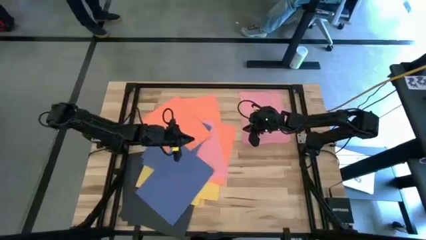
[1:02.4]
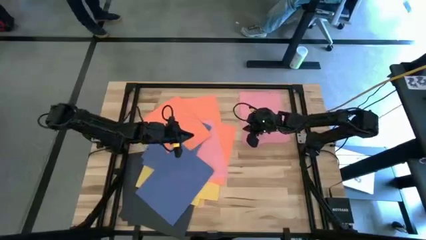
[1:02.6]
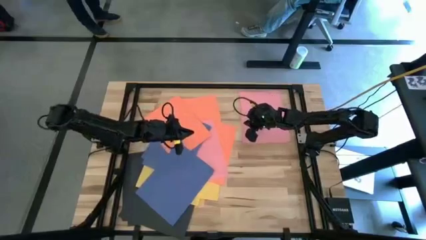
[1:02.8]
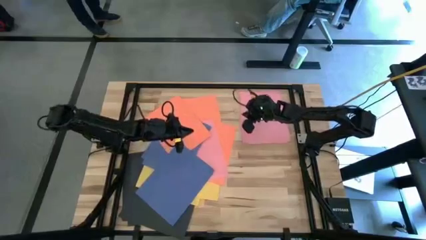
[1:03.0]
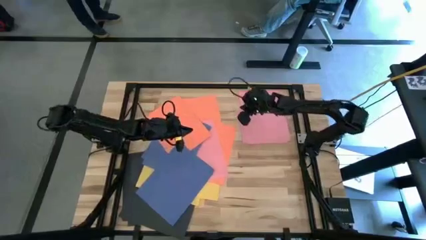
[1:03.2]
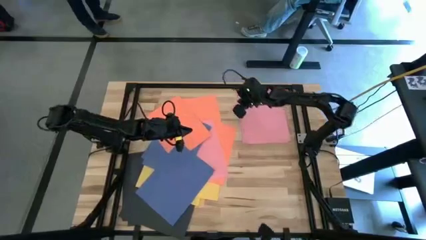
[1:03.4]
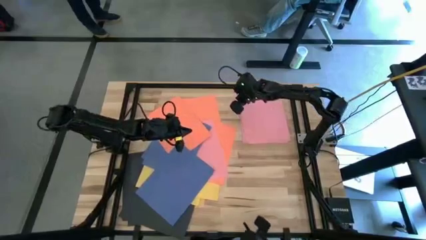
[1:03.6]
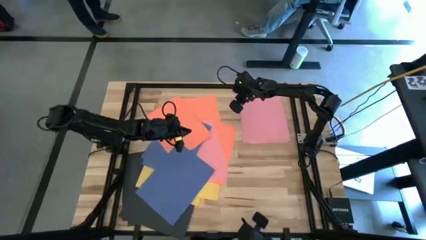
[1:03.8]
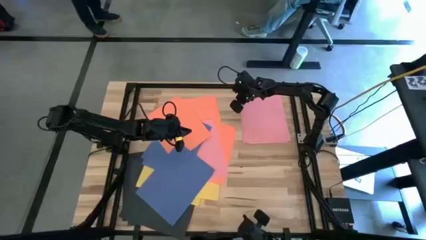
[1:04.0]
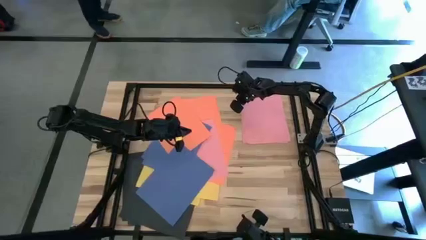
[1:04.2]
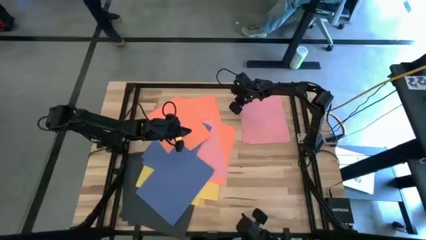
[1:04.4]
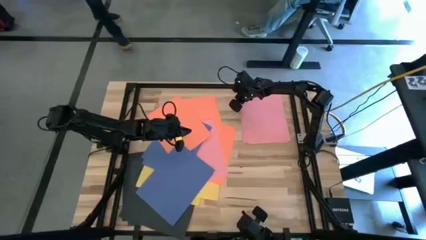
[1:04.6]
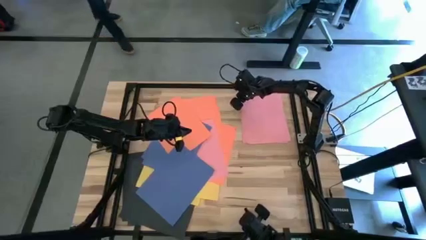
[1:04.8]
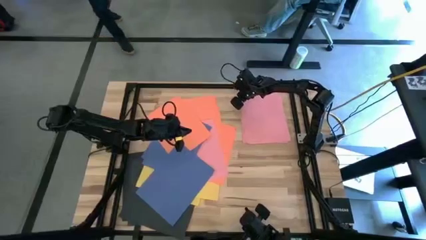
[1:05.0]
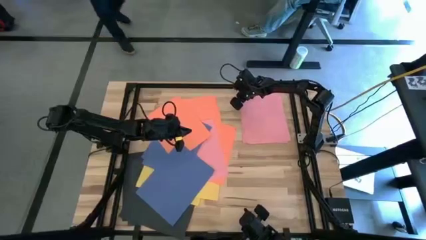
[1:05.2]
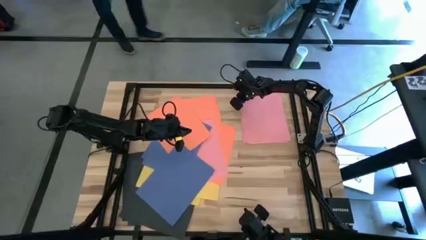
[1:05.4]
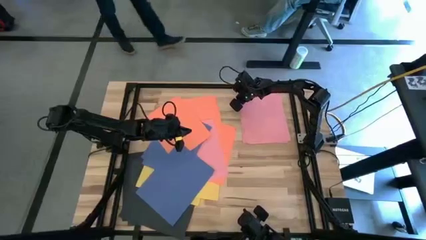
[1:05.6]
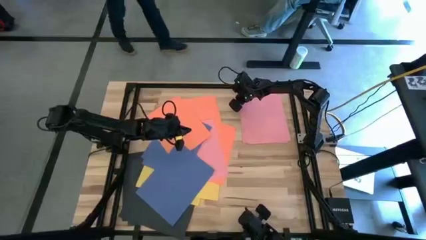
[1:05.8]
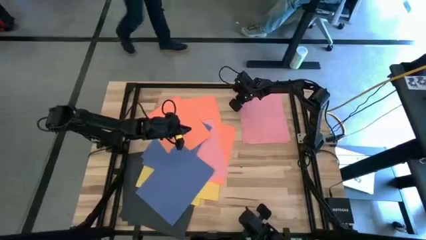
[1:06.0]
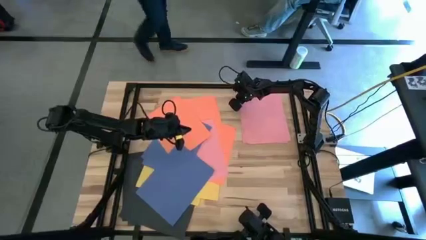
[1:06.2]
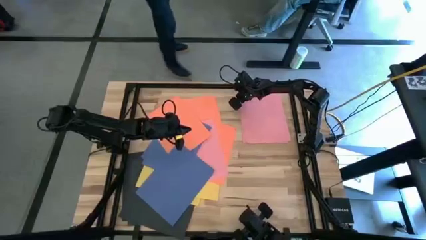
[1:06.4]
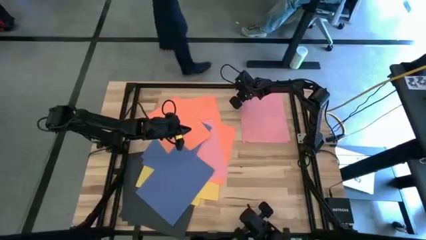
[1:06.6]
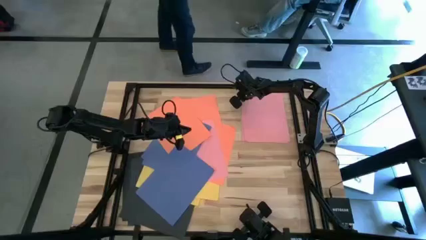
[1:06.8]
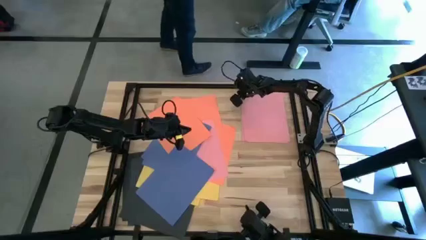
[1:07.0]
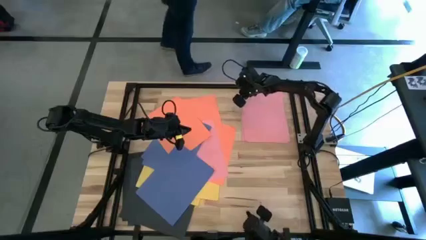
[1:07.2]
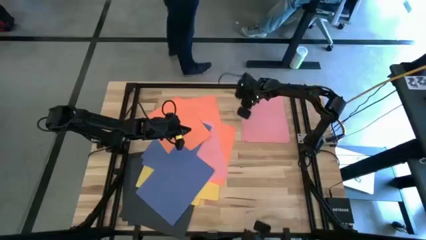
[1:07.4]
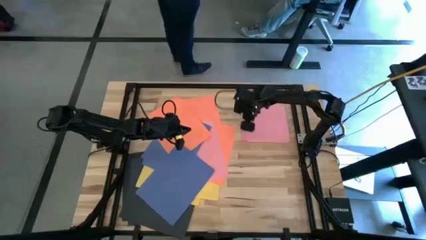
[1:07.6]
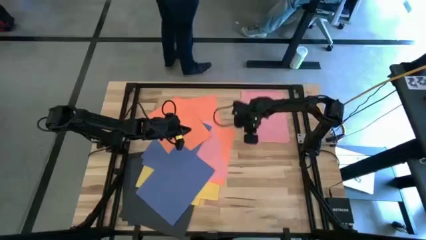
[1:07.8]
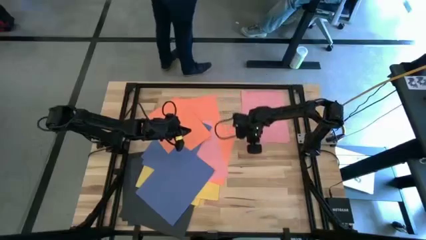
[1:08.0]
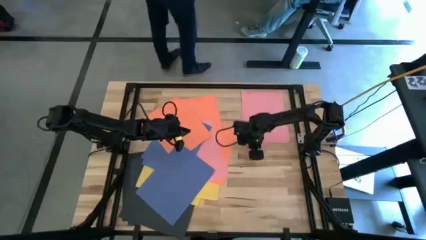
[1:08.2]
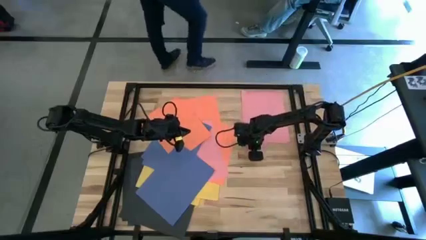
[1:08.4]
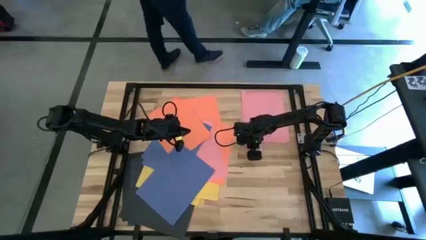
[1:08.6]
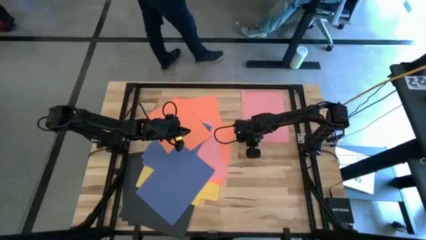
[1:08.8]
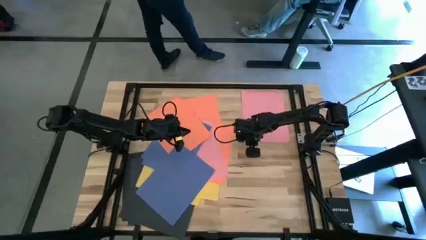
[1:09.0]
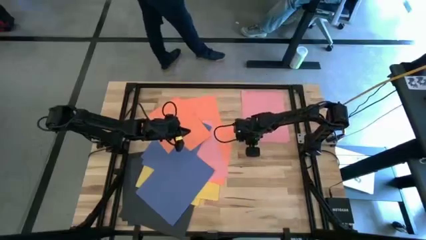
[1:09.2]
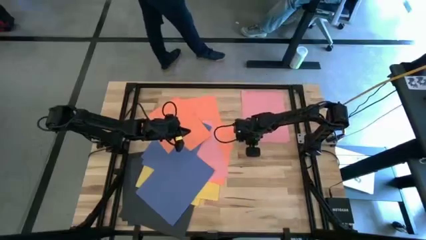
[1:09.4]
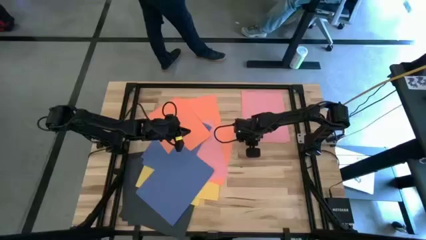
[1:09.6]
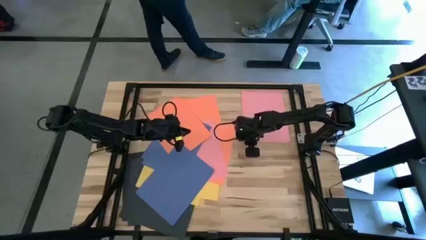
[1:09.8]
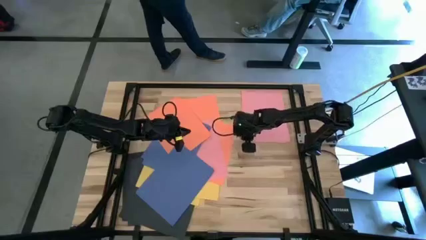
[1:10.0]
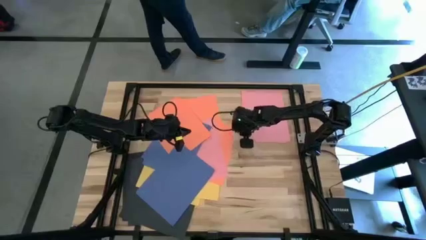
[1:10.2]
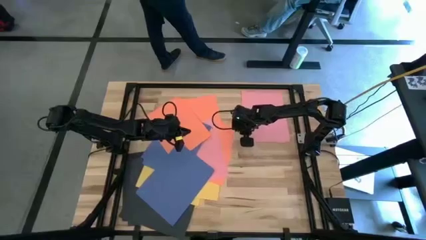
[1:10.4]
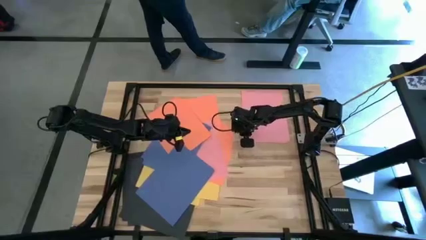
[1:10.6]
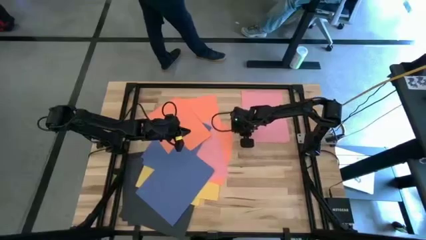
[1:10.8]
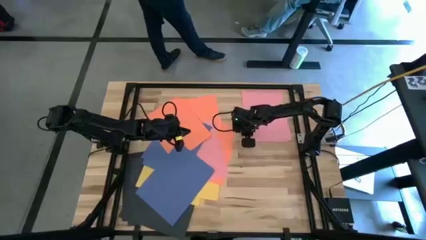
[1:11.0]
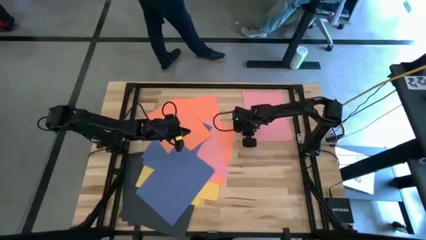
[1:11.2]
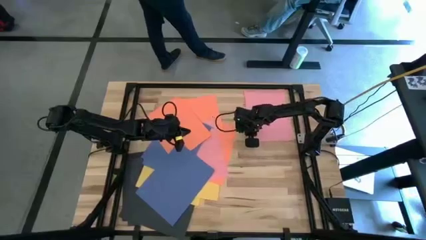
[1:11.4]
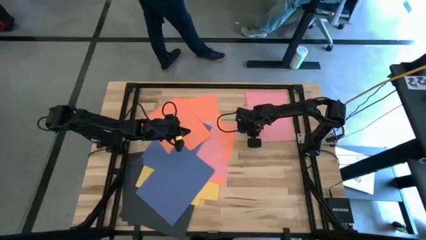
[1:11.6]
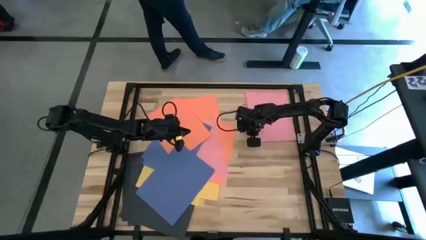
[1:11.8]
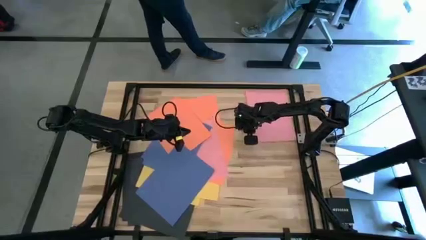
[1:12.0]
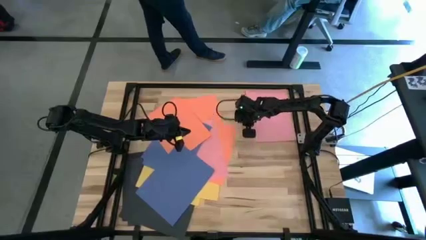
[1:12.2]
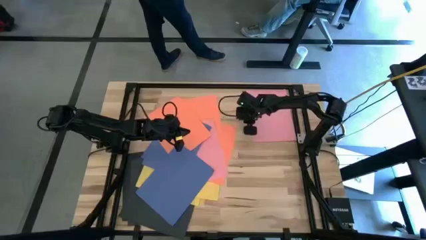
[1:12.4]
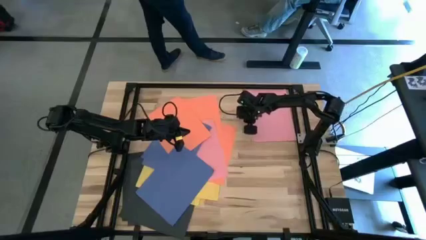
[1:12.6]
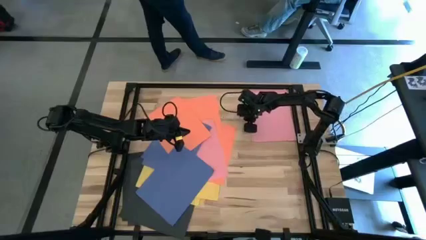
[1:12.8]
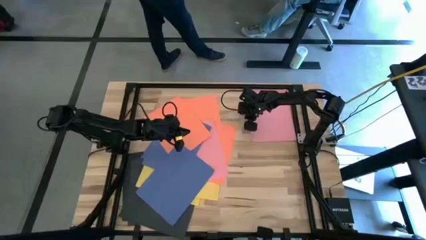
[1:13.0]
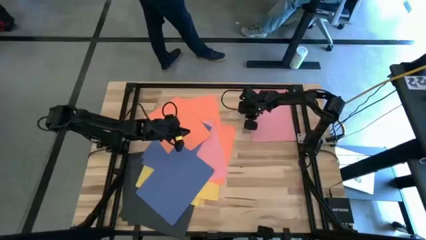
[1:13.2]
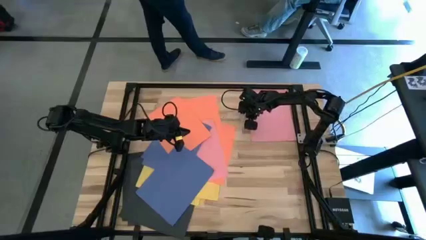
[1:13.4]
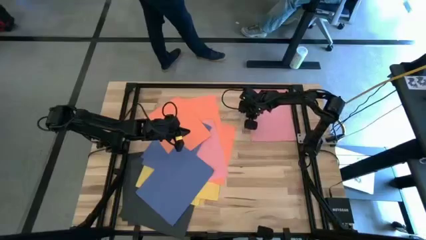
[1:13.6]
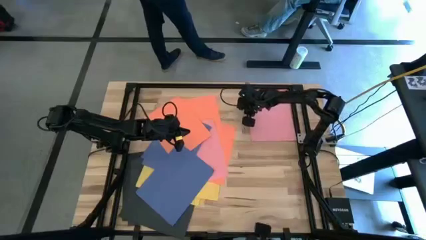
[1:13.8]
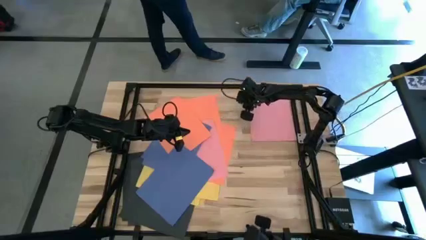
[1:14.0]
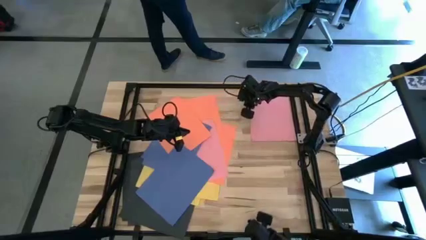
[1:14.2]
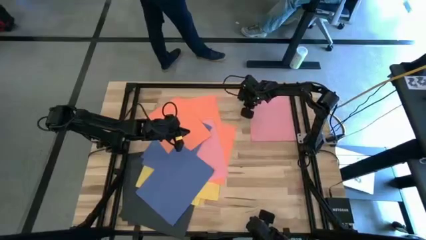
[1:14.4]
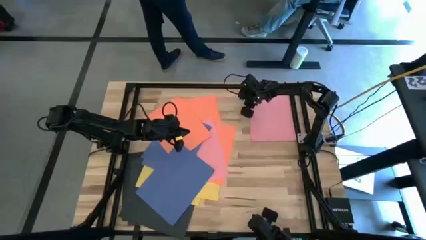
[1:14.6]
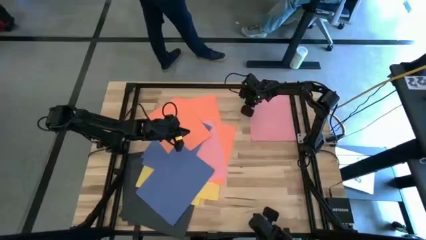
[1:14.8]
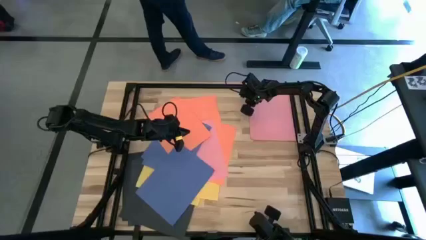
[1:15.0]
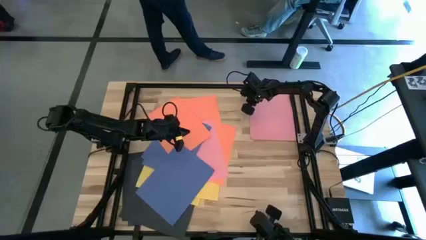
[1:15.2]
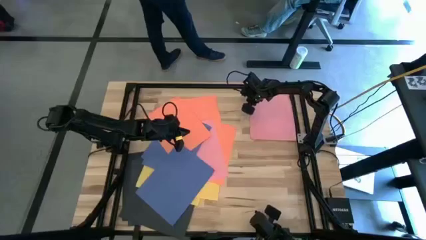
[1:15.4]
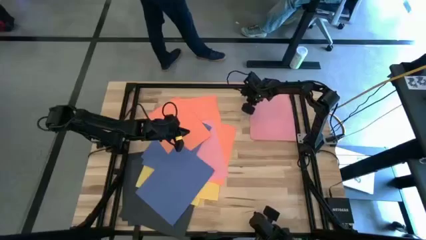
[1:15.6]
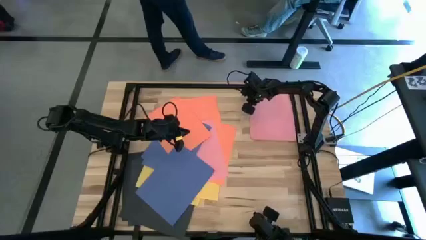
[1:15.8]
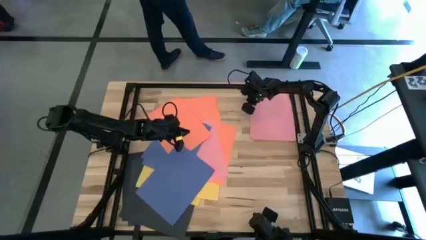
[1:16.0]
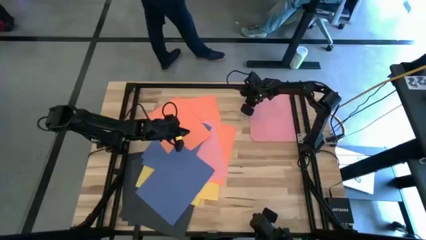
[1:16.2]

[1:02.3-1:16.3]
Task: Organize paper
Stack the pink paper on top of the pink paper

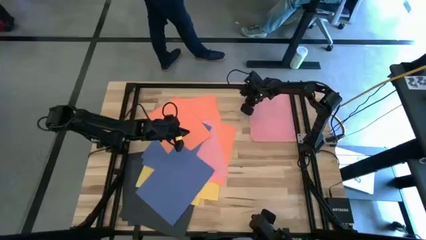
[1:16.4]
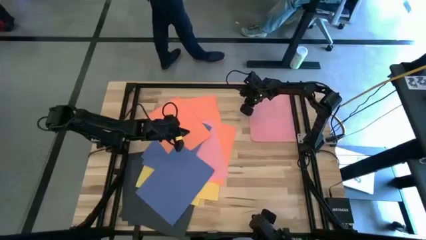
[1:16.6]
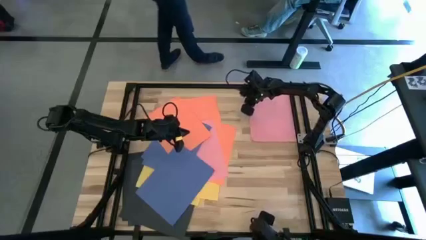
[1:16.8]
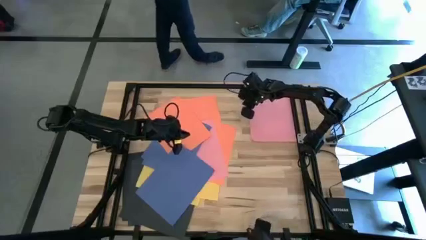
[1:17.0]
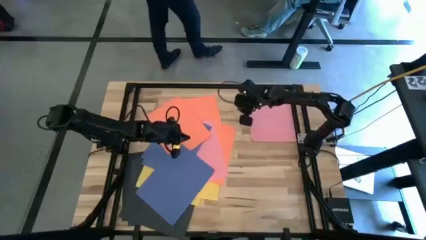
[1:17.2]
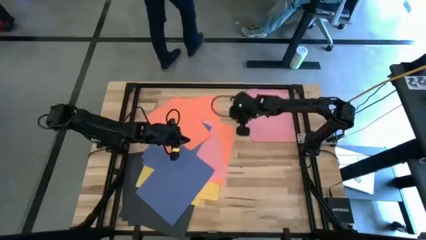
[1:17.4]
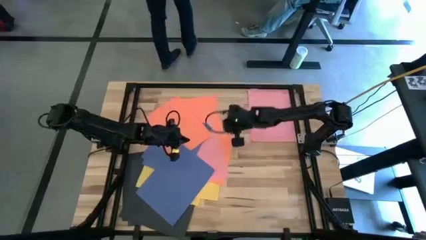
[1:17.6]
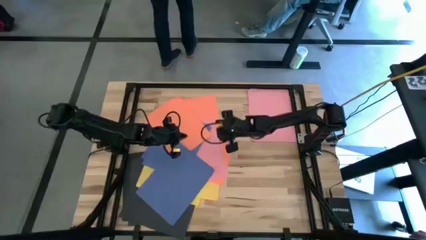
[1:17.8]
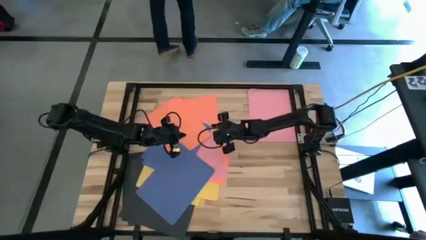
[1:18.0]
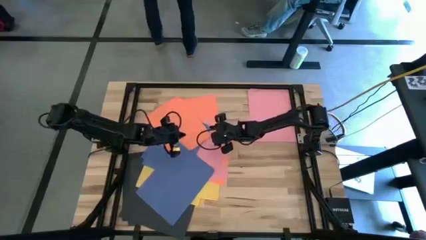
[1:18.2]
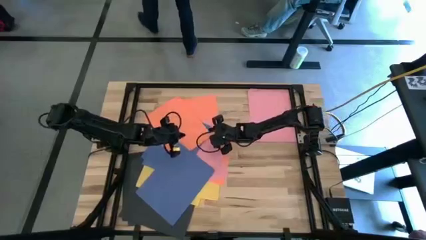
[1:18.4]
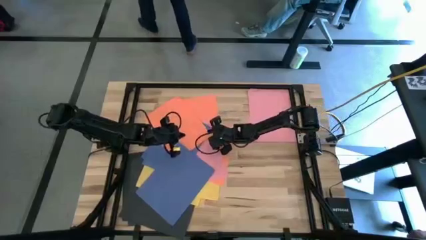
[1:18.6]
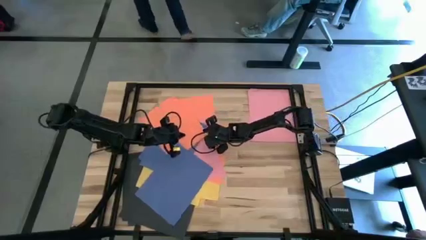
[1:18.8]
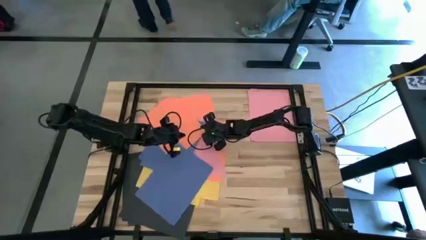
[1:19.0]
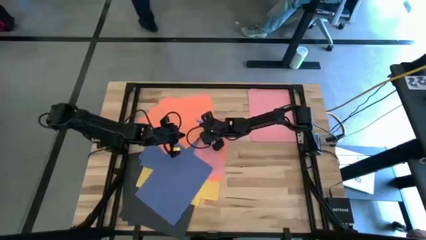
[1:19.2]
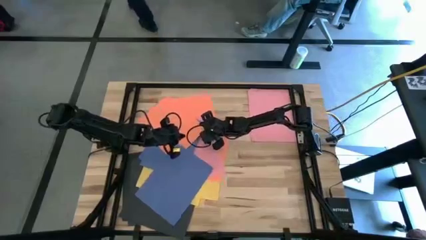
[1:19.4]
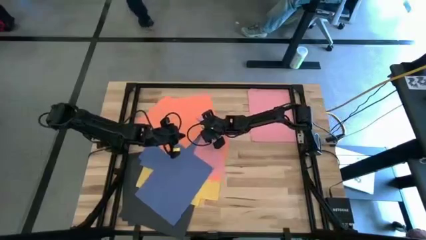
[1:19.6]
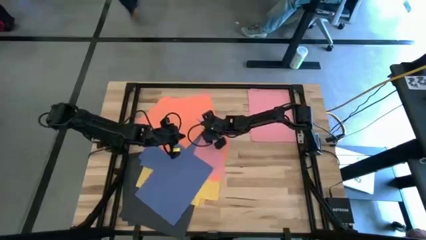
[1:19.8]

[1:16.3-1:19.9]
Put the orange paper to the bottom right of the table
